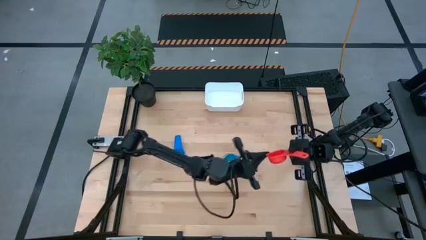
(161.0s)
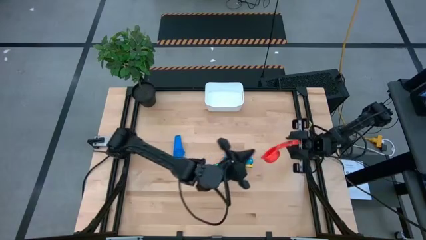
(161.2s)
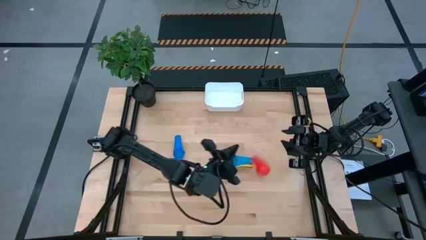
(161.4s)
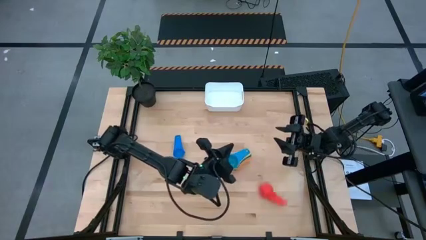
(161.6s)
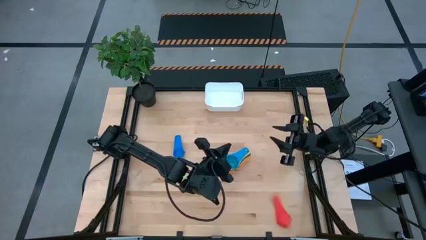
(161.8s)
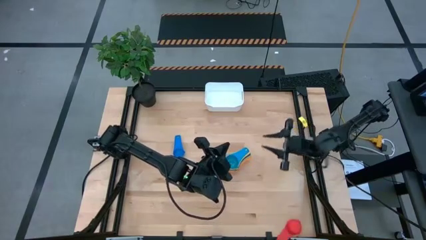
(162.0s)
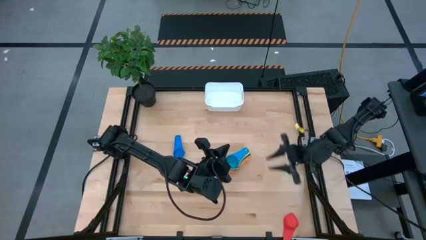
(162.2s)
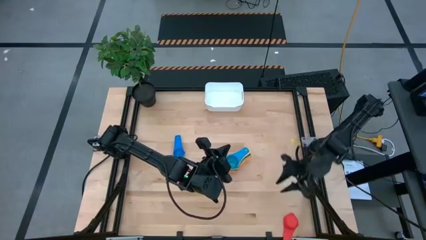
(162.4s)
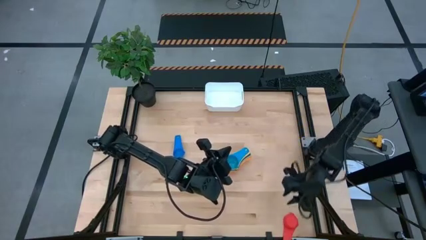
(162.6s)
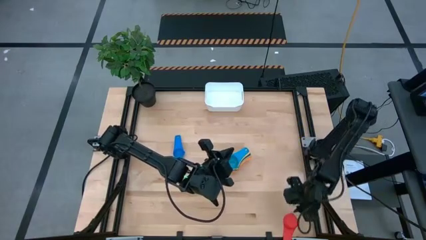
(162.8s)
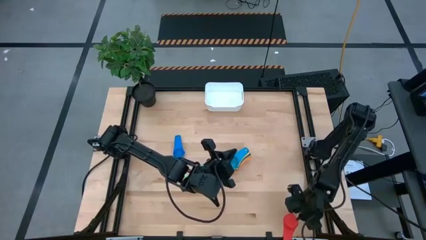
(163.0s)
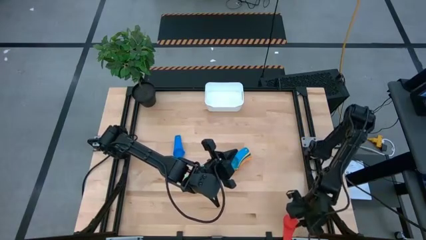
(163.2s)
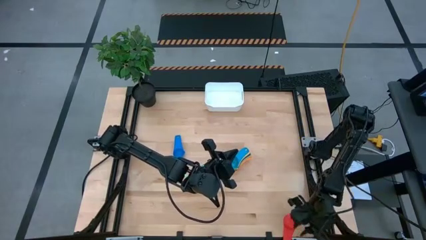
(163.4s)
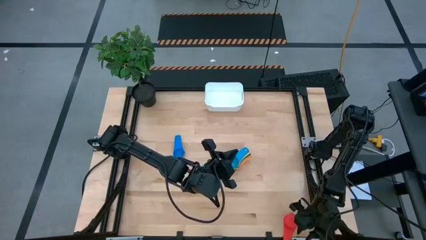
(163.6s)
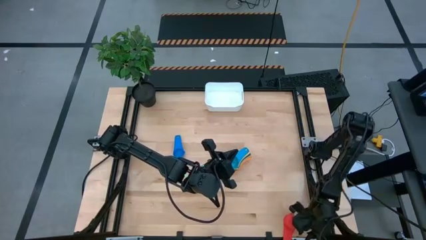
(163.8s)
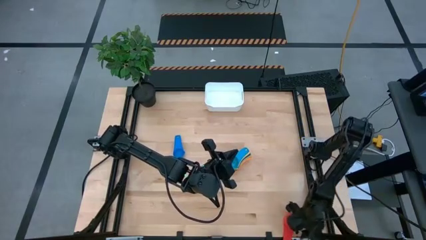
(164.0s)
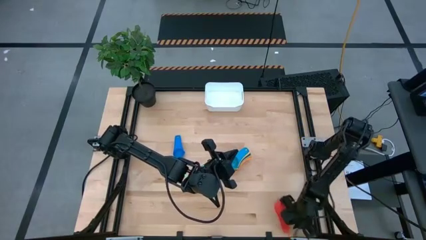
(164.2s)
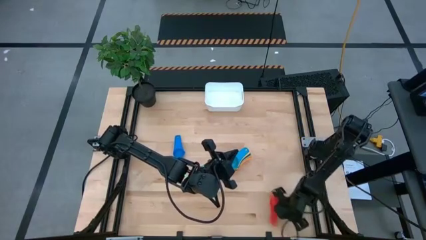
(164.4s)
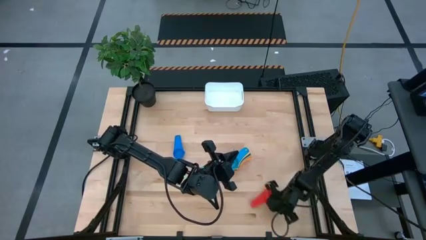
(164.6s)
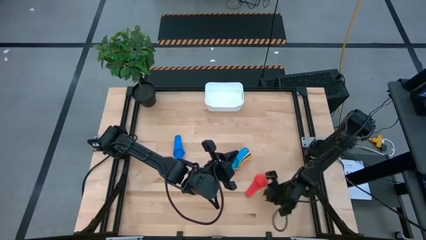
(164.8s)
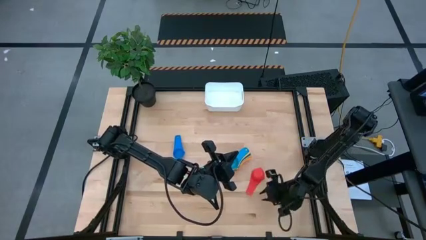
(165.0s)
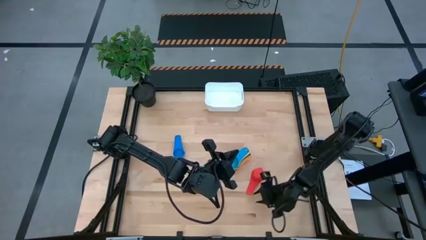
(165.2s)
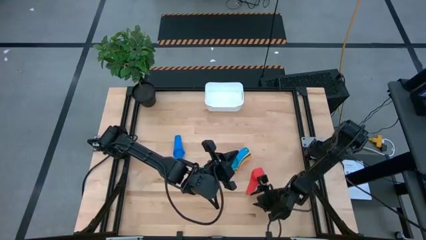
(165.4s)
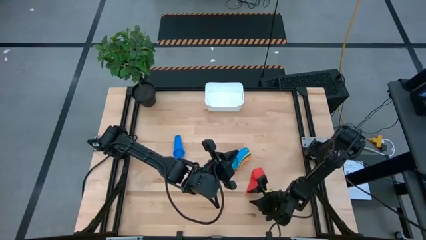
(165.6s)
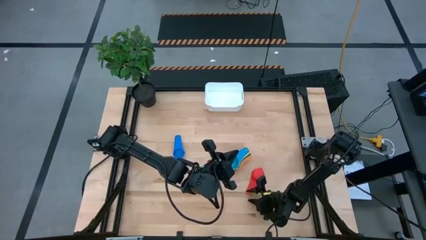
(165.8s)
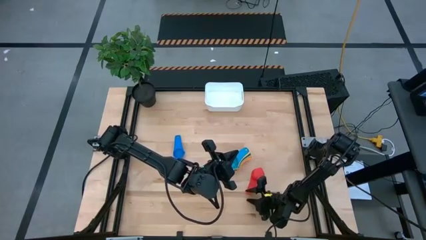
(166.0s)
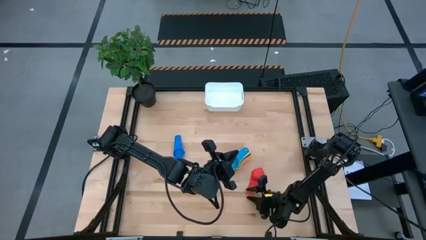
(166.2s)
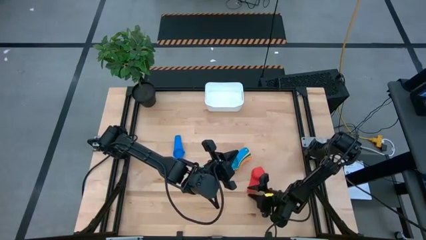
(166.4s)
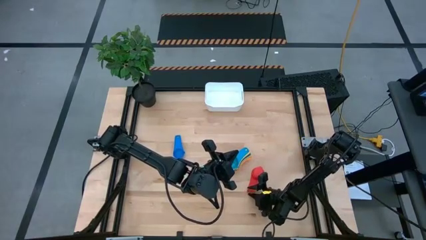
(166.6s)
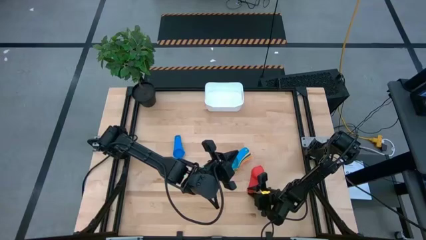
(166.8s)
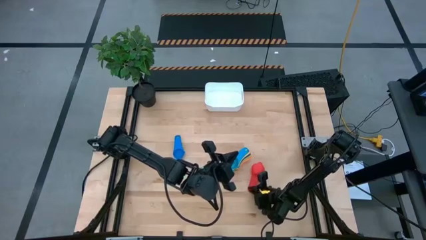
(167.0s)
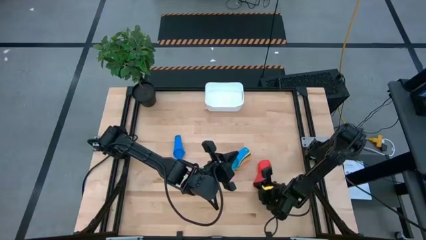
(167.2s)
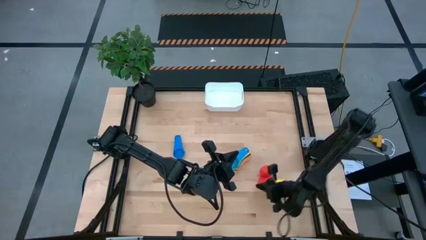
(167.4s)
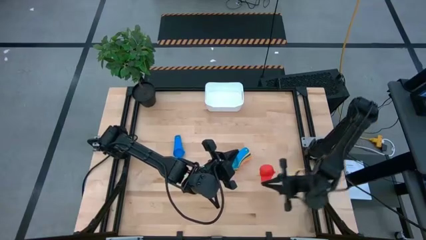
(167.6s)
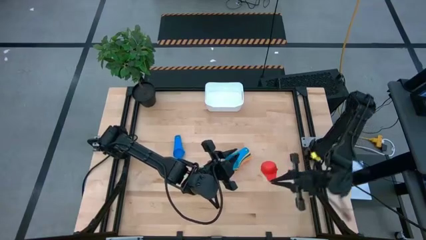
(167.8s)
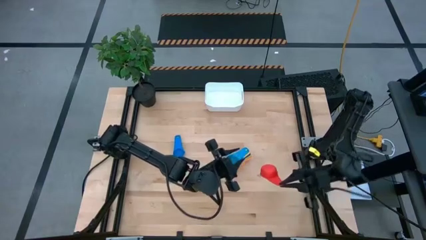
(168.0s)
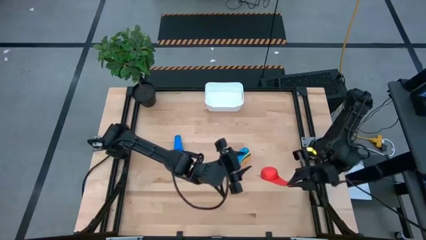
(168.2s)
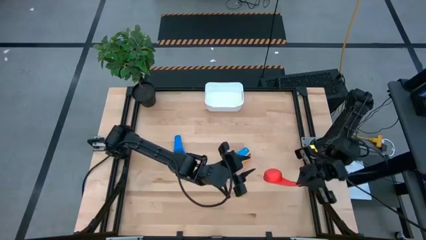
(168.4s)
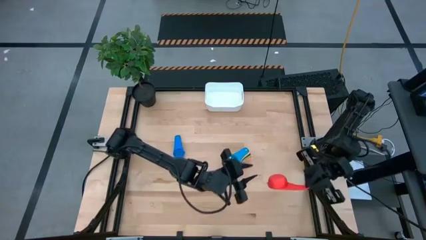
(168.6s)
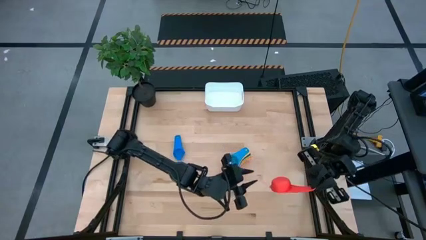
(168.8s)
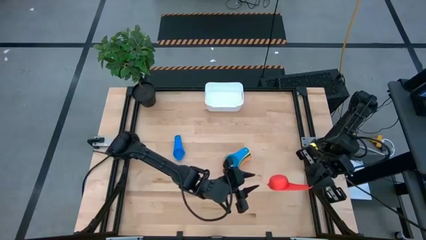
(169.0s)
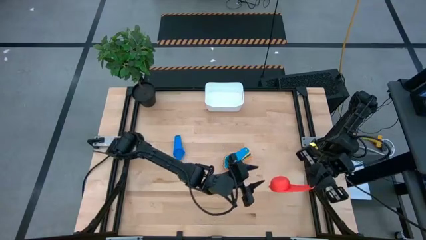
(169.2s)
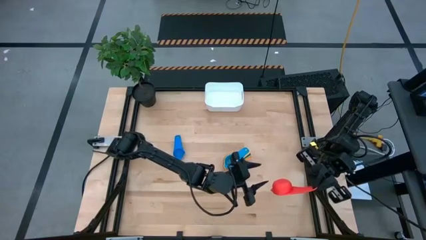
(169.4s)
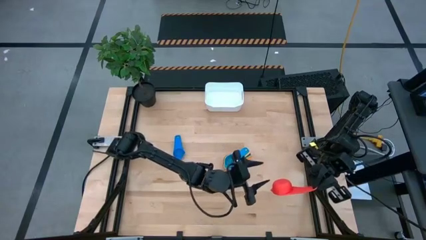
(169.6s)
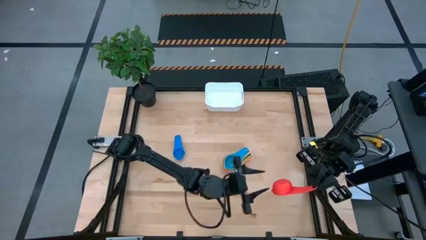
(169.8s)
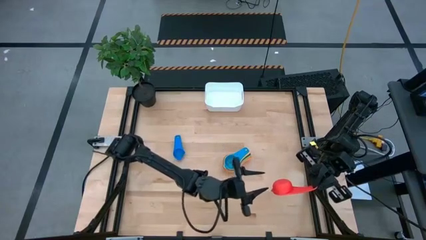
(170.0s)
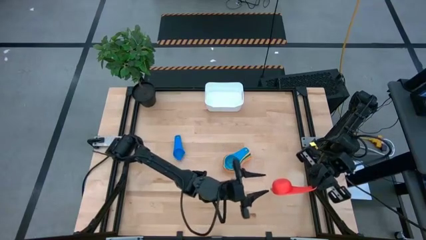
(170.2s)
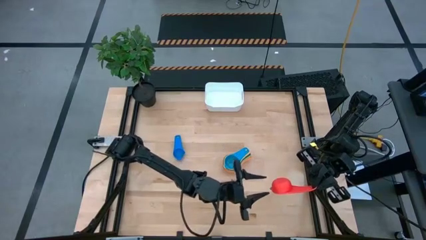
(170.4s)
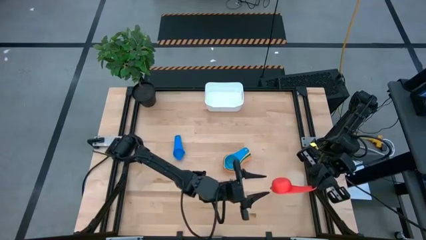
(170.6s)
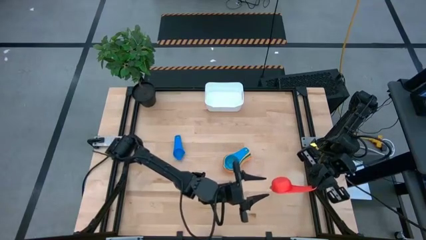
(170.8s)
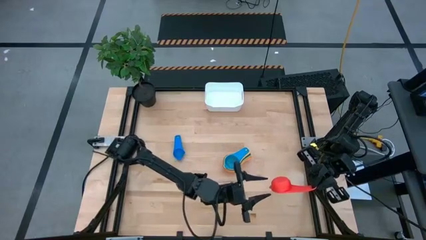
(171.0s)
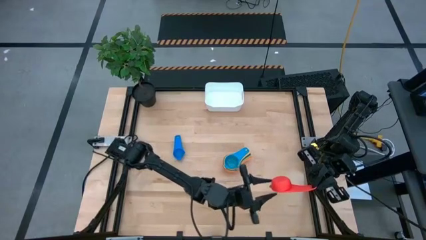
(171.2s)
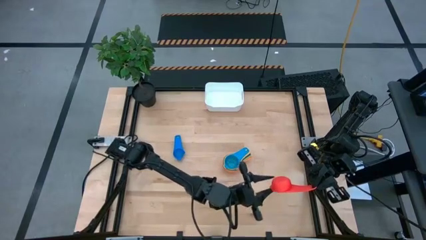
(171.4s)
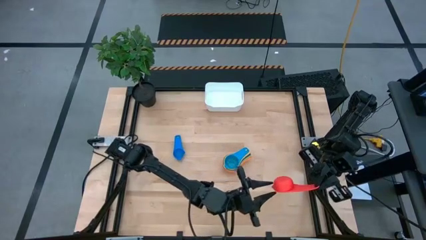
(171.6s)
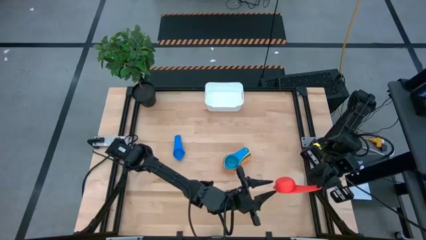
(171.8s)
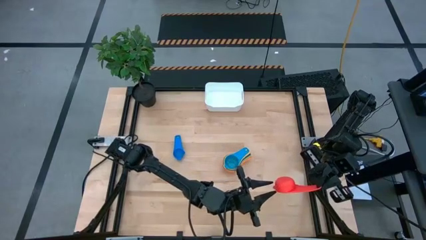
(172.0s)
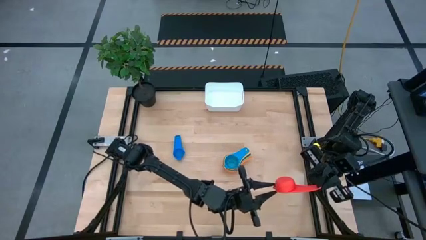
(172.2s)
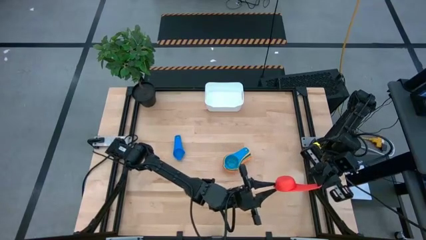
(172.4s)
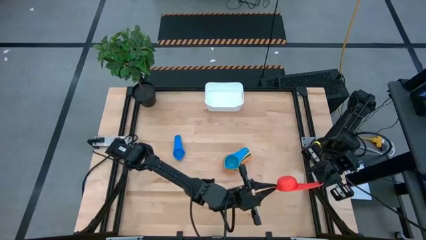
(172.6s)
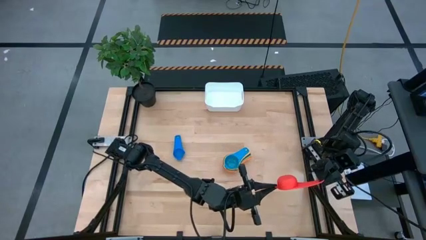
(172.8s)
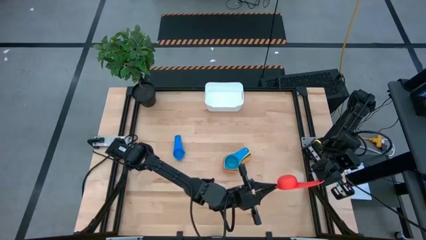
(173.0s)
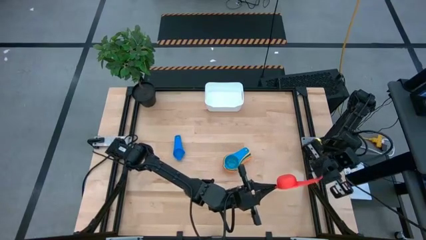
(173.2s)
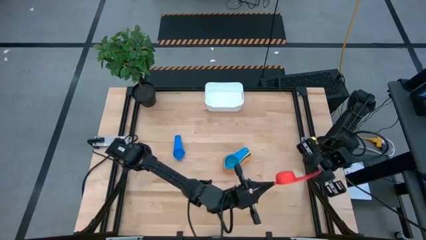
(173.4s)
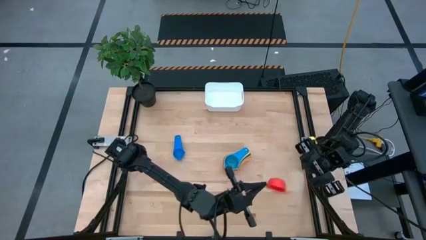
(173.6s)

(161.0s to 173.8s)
Task: Nest measuring cups in basket
Stack the red measuring cup on top of the light blue measuring cup

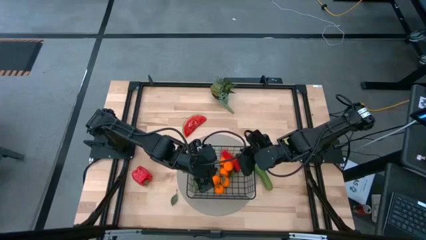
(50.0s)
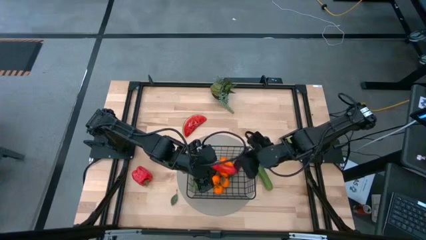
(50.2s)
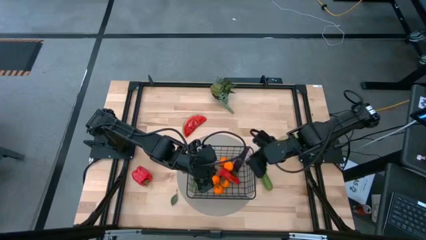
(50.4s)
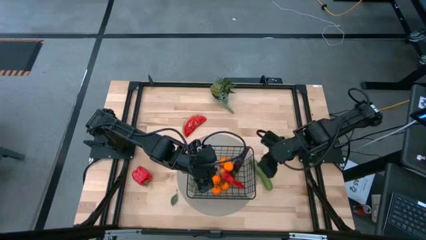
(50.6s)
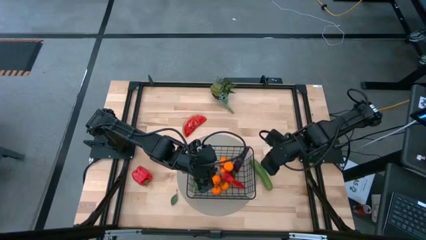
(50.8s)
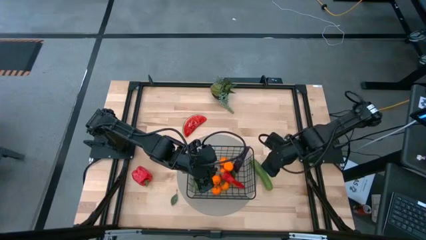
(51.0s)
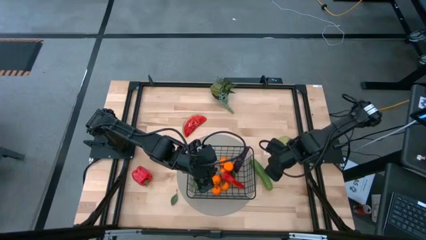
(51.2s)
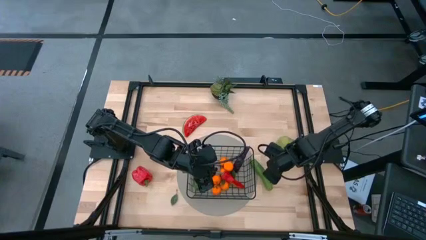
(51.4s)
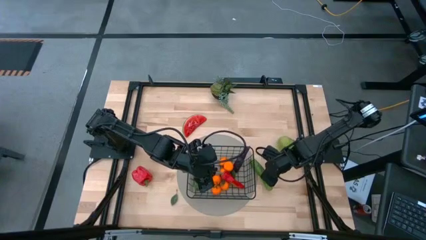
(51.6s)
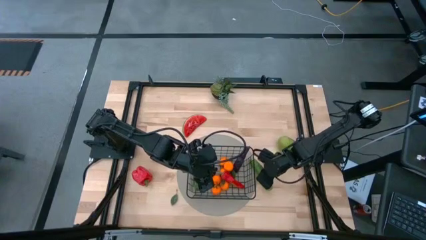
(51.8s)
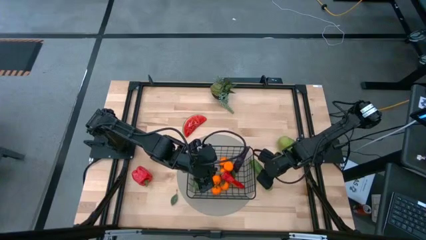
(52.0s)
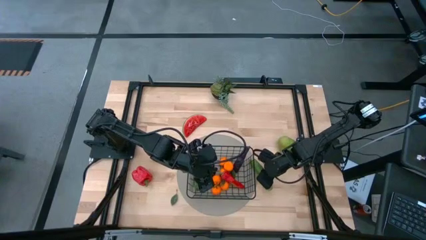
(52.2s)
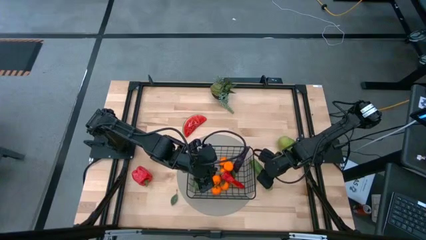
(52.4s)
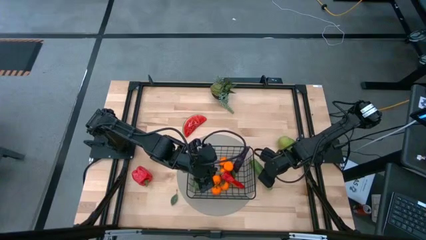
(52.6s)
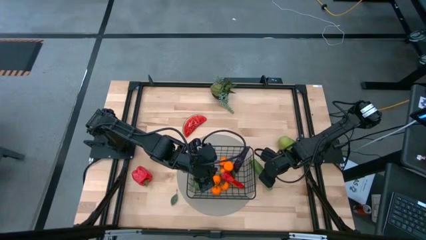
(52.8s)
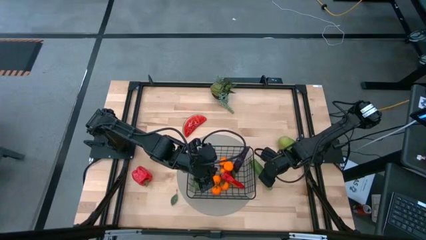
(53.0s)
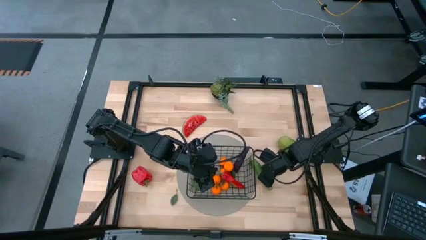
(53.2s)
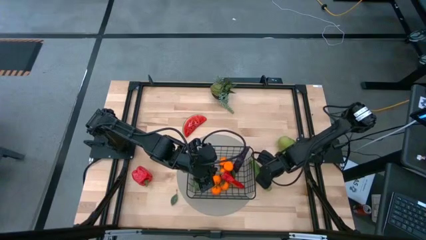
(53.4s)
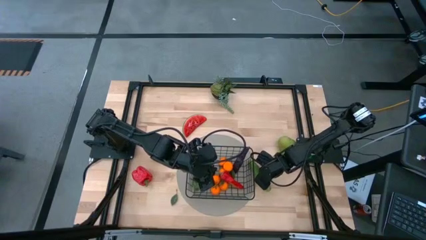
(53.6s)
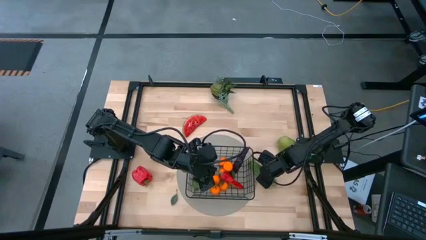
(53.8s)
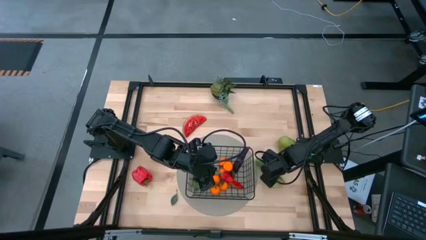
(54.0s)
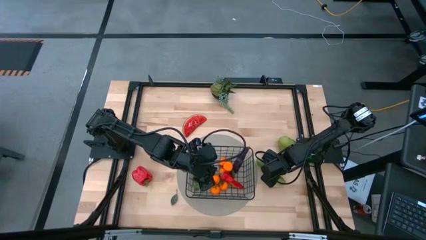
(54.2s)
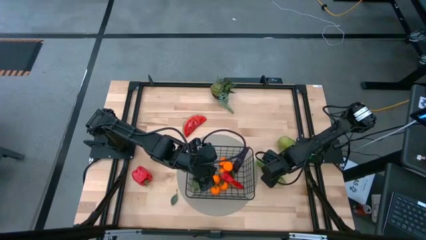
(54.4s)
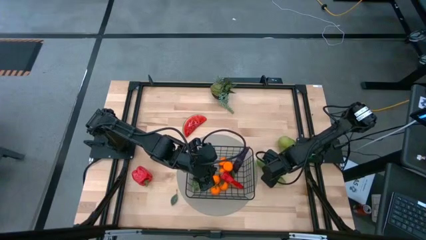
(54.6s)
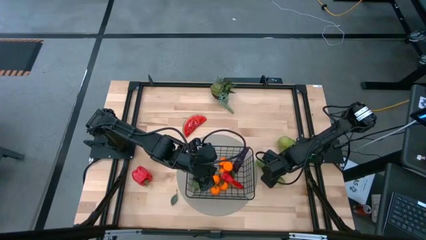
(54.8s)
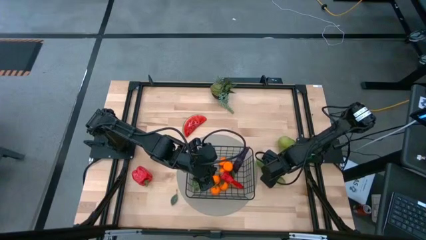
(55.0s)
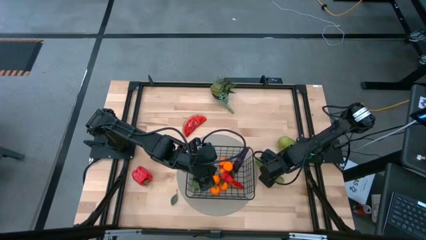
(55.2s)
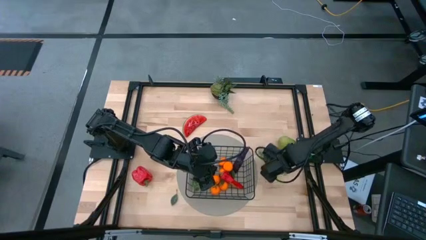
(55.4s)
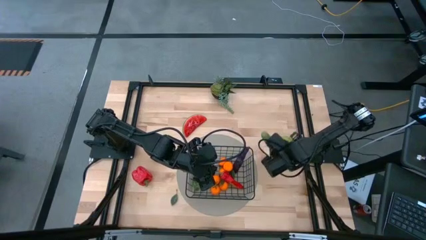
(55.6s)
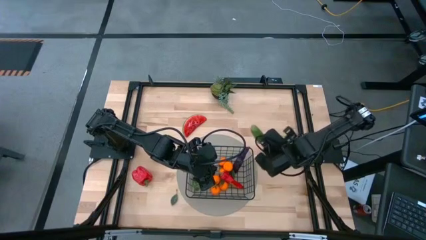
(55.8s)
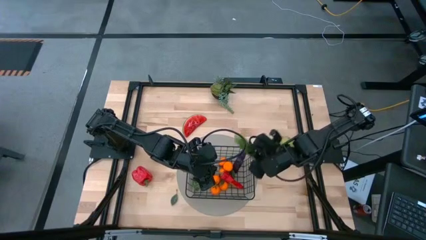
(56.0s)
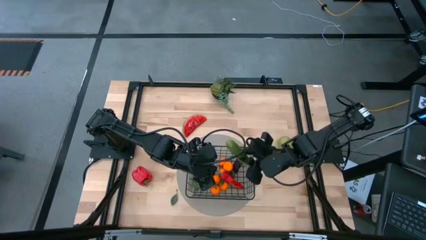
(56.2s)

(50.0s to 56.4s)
Task: Build produce basket
Put the green cucumber into the black wire basket
